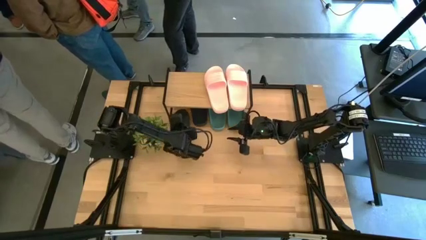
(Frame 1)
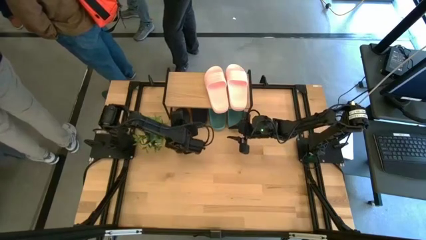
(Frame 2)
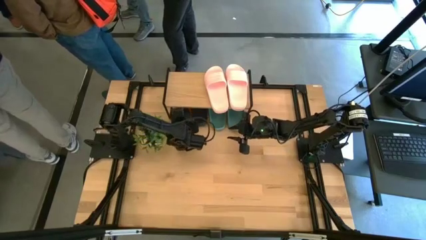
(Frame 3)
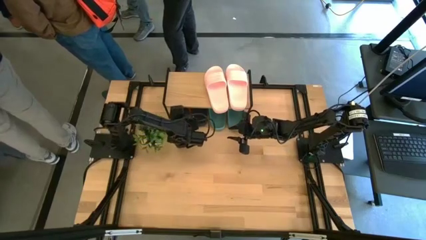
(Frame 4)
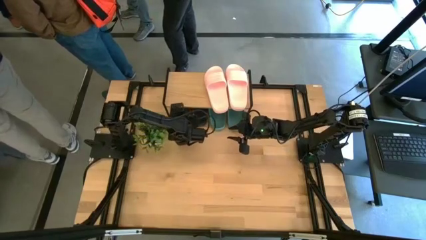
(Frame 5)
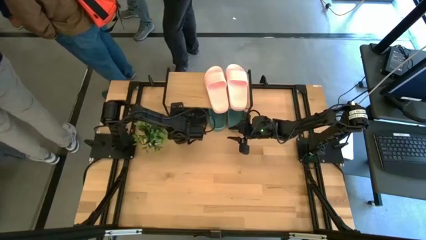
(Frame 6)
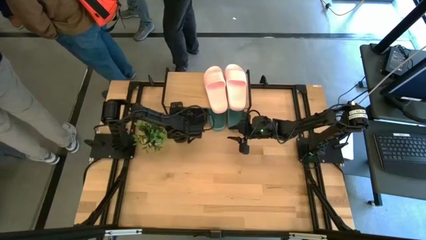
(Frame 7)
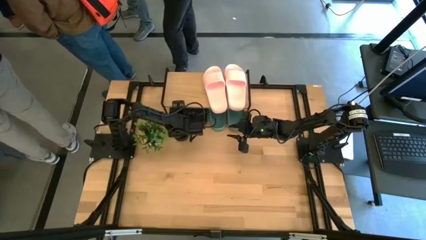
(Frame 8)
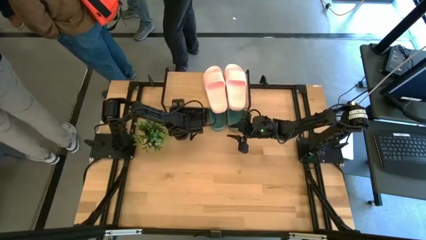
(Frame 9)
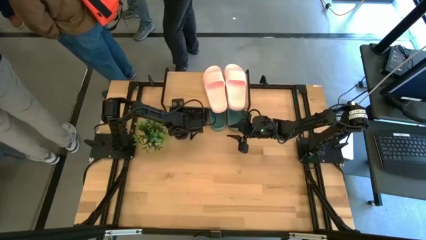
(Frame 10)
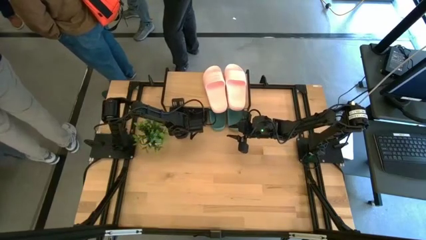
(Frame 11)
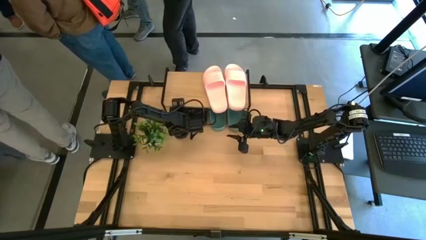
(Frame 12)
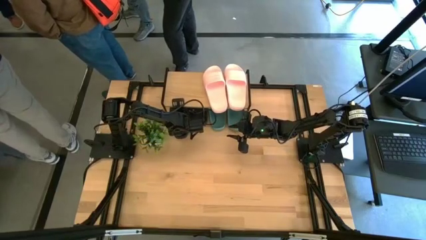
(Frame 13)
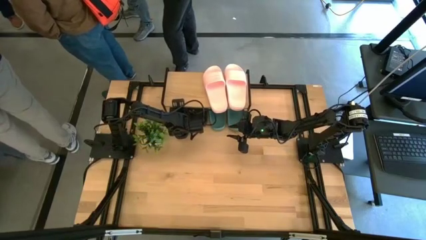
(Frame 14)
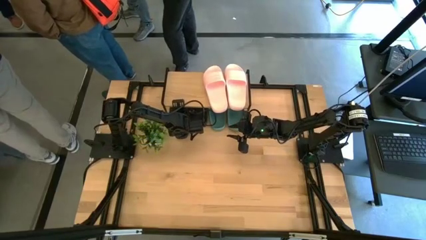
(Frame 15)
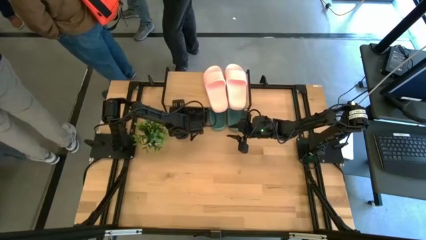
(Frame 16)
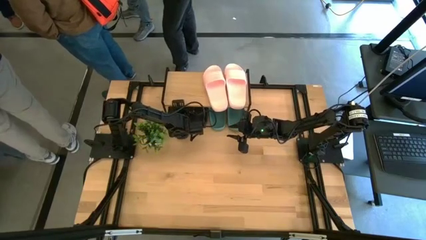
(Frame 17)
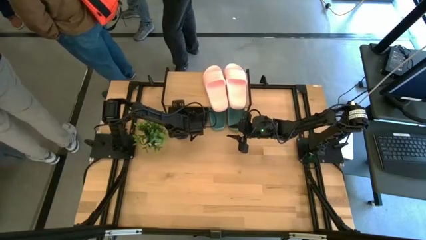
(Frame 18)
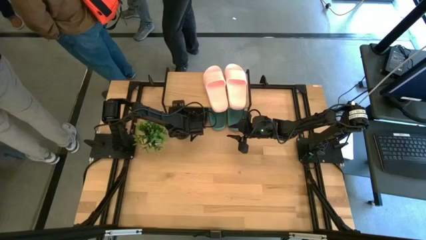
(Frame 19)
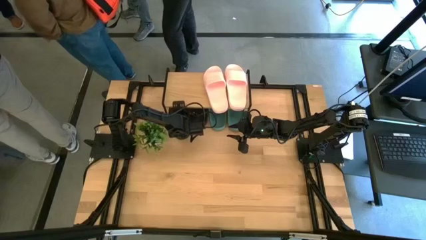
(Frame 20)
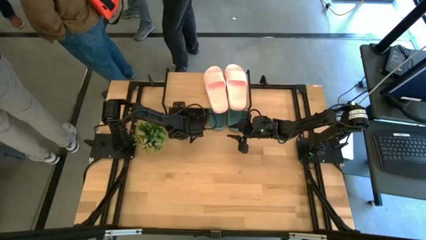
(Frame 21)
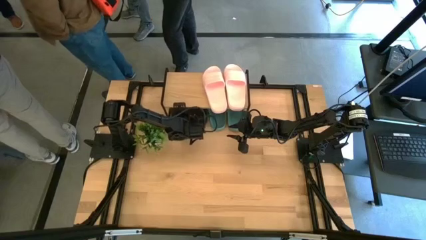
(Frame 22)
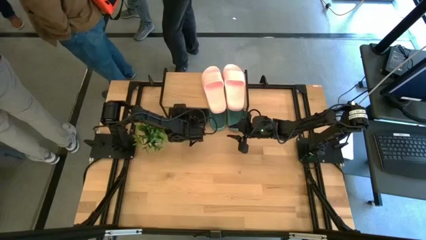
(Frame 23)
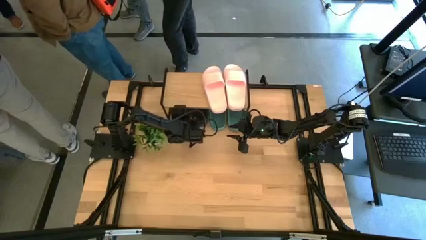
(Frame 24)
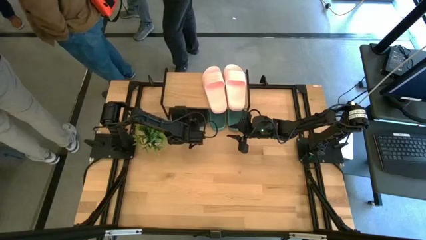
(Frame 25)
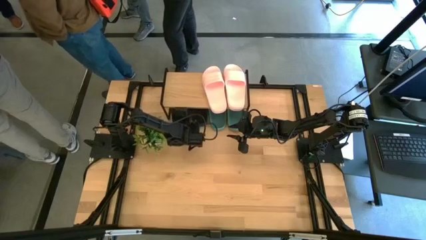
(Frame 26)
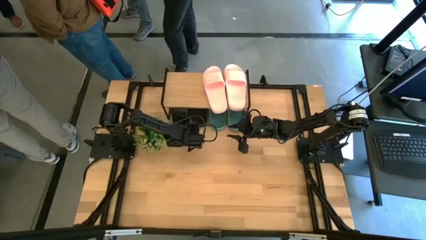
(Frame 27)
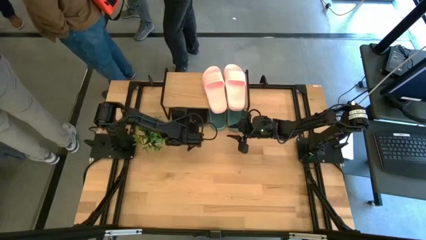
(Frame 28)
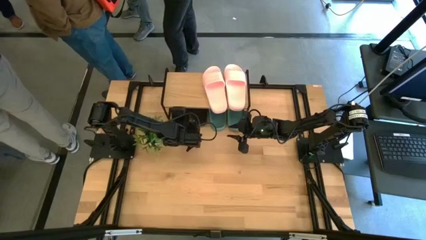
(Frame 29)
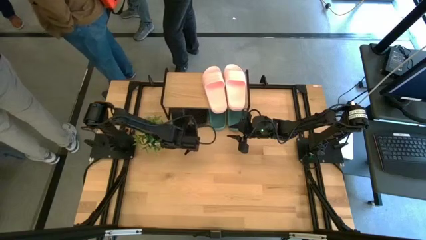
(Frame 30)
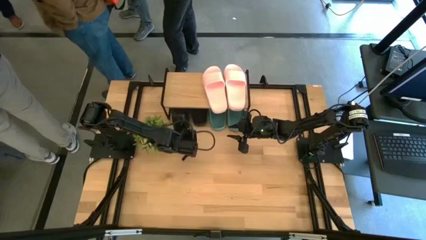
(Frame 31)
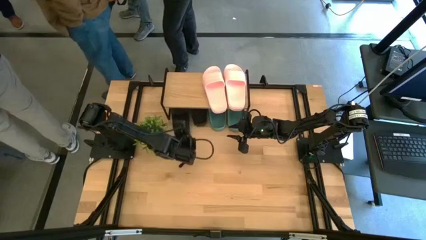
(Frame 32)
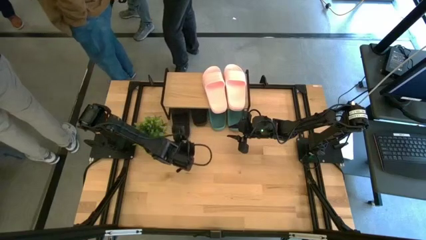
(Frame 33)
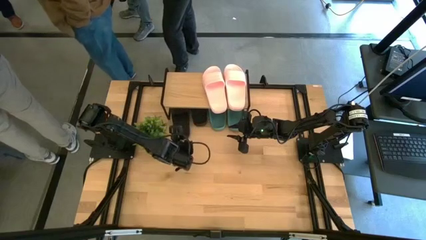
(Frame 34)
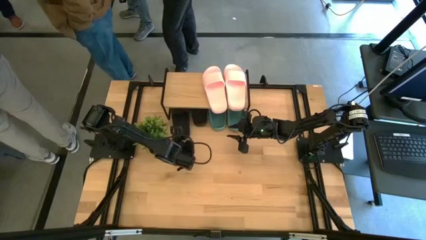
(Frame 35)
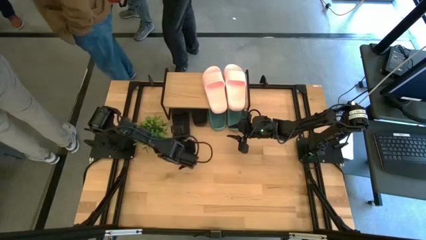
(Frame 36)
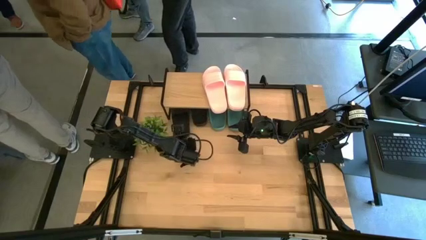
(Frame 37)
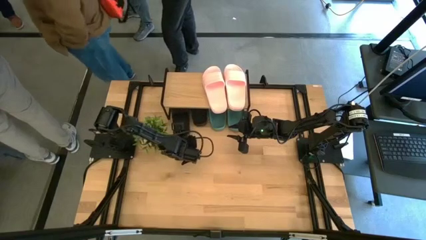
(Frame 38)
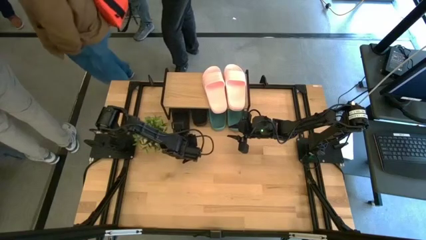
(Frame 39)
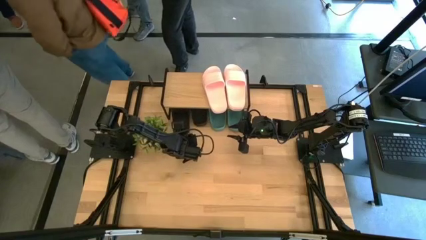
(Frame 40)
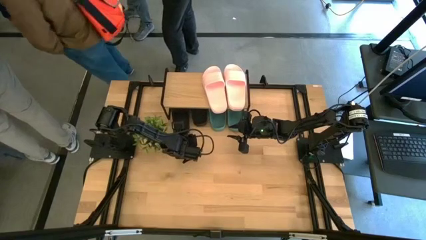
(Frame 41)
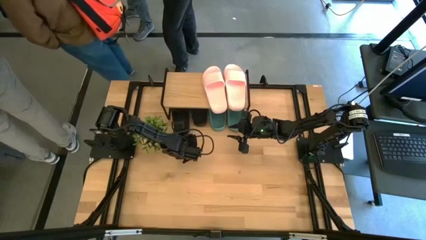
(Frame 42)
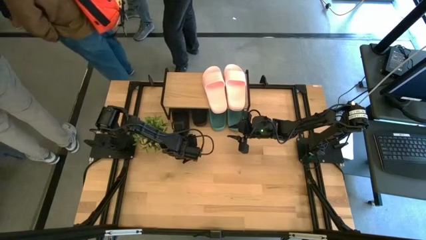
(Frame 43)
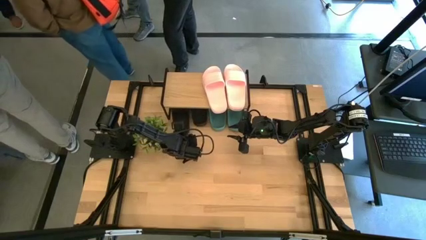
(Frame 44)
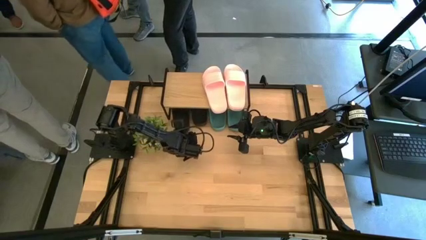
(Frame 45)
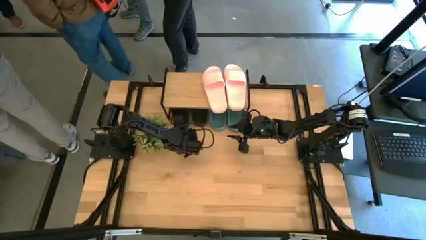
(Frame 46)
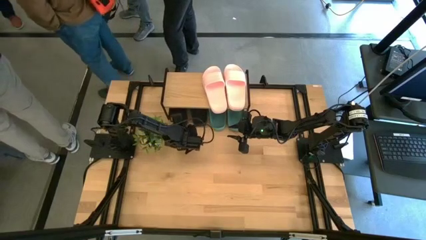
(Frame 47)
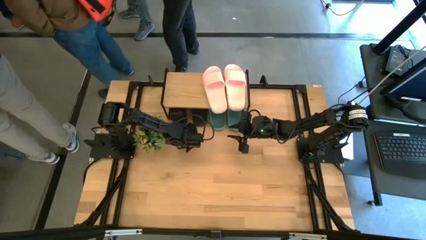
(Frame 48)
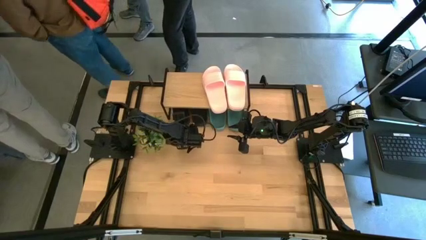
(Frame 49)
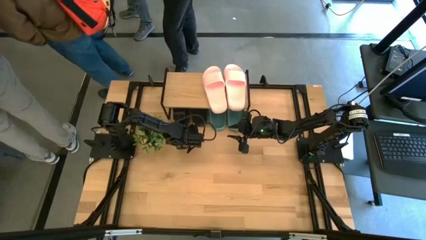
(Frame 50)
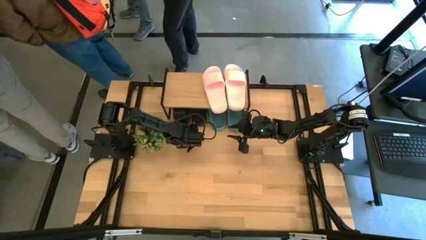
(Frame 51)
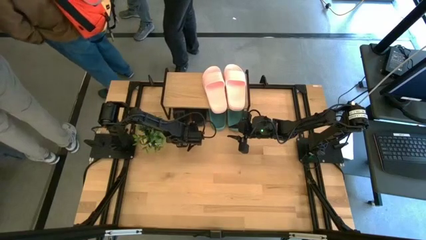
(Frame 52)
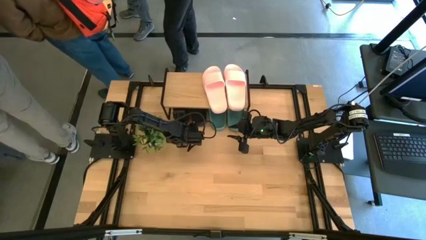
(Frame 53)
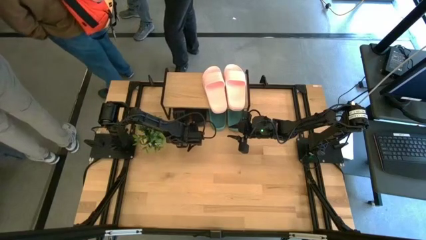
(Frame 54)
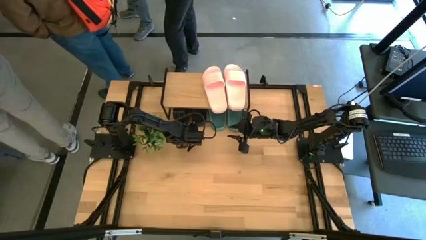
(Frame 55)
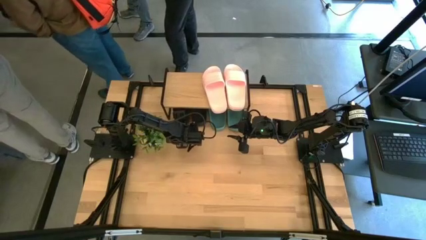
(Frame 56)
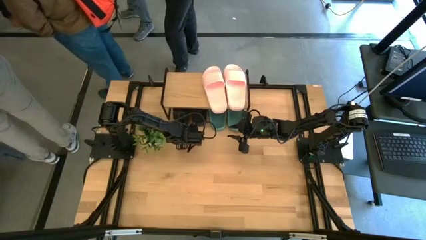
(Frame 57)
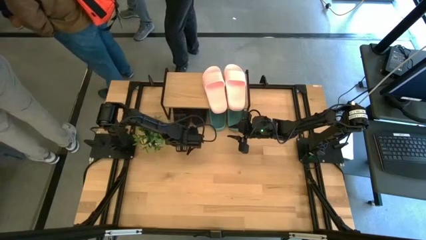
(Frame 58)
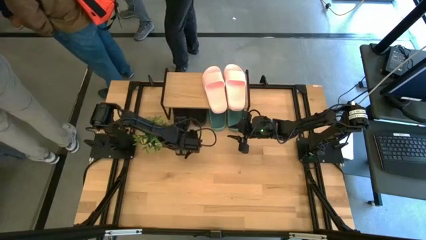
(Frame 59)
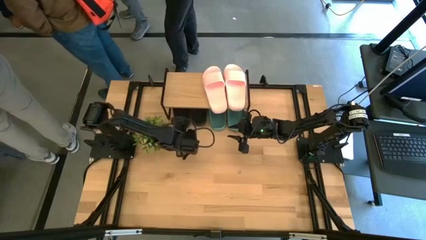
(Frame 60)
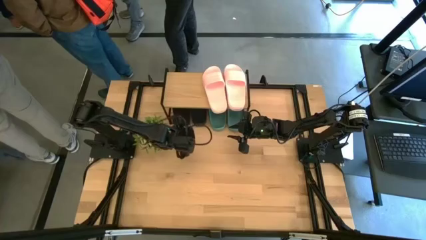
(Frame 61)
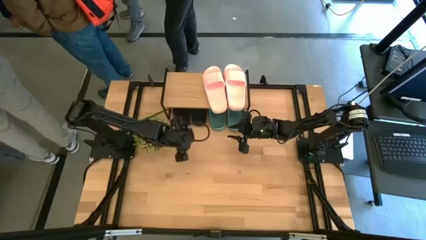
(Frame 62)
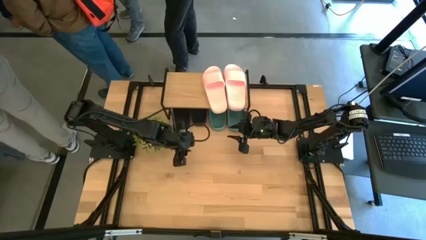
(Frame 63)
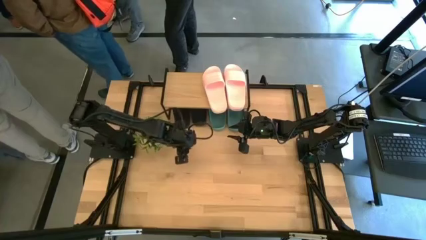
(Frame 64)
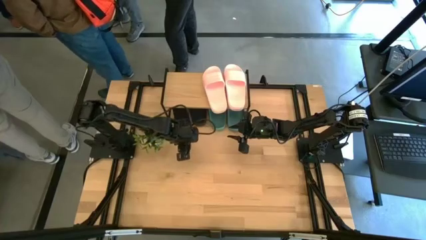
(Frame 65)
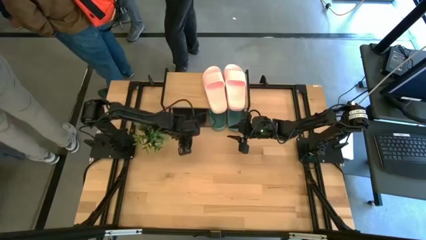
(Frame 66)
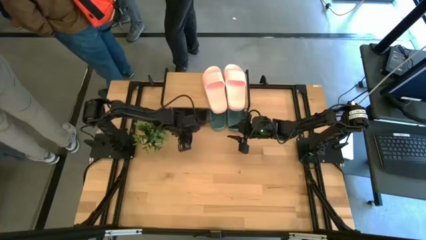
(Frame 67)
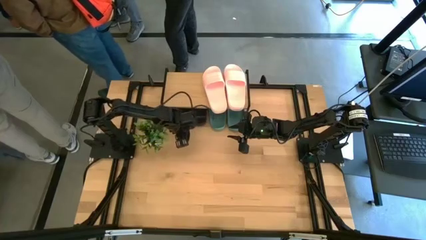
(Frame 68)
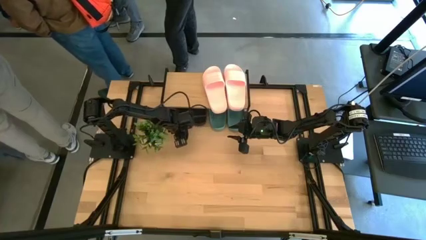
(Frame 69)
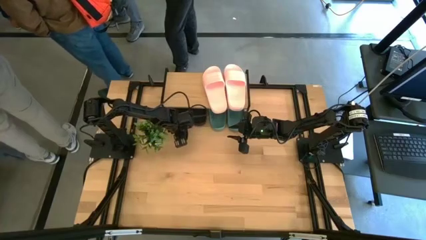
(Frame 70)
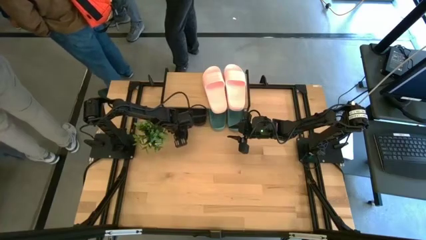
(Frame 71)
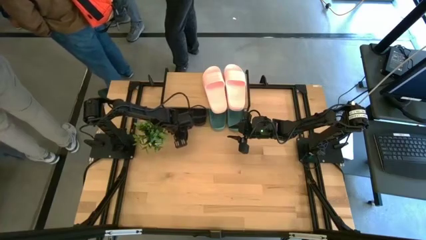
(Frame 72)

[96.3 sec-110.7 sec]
Task: Pick and place slides into the shelf
Put the black slide under the shelf
